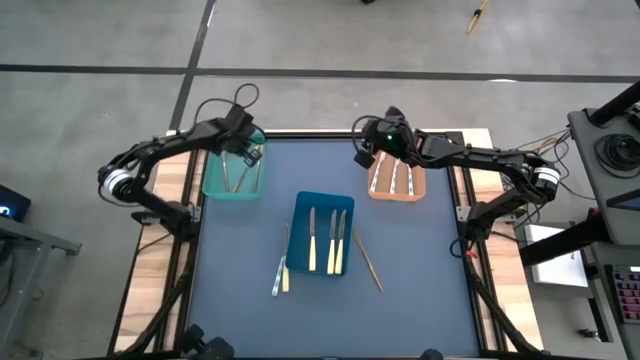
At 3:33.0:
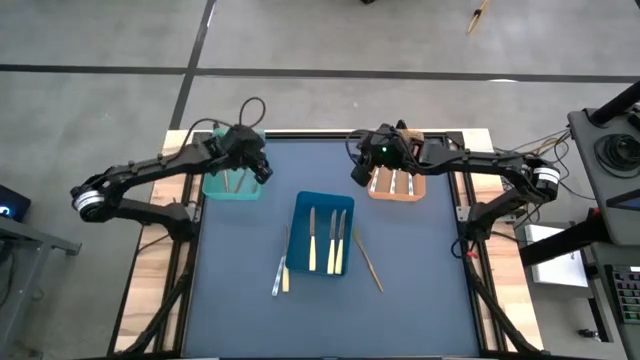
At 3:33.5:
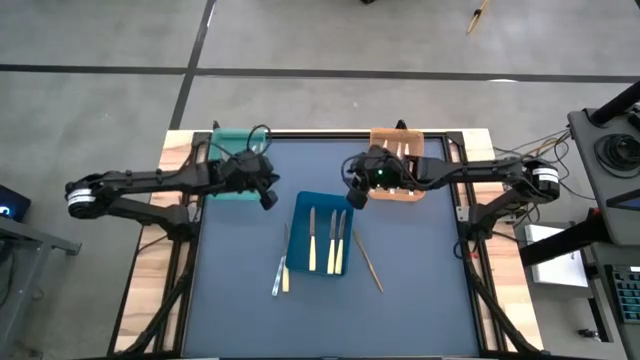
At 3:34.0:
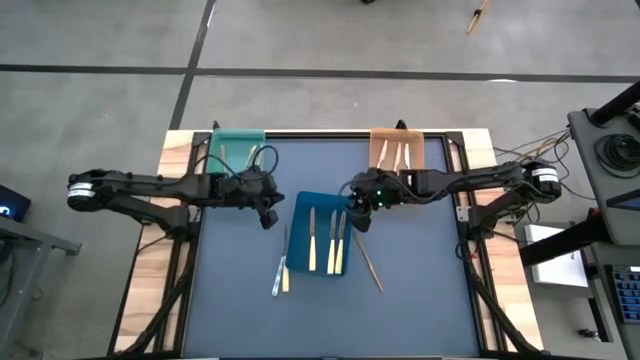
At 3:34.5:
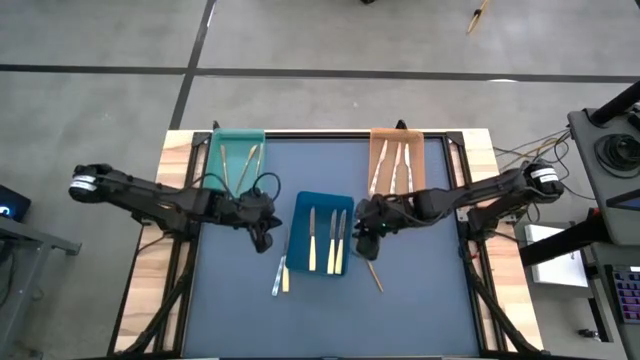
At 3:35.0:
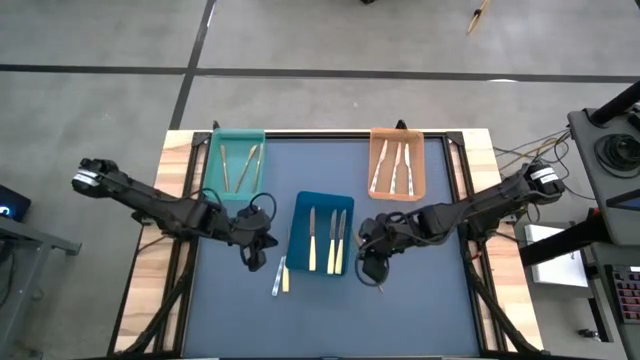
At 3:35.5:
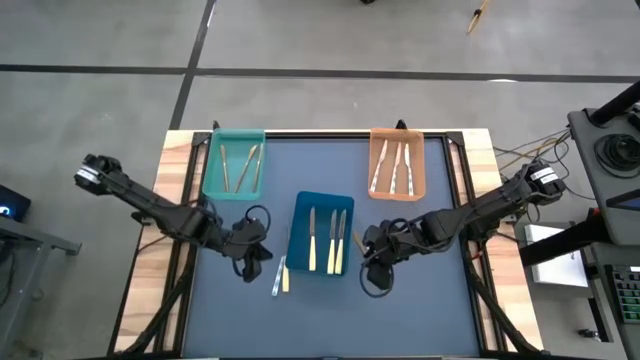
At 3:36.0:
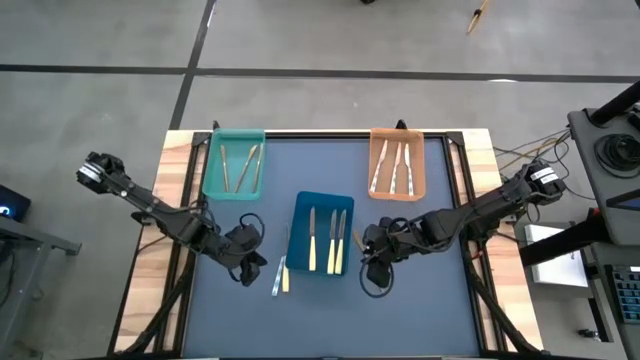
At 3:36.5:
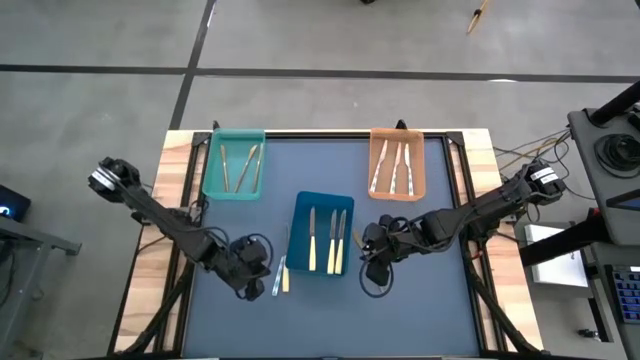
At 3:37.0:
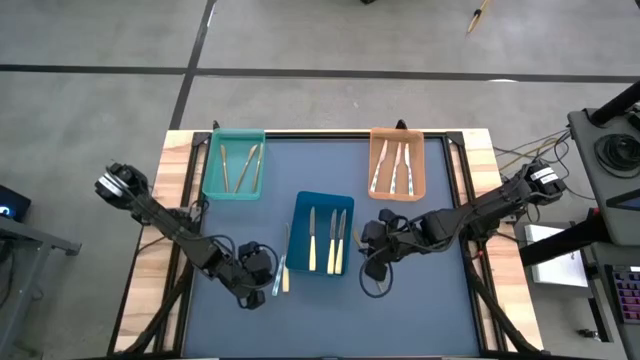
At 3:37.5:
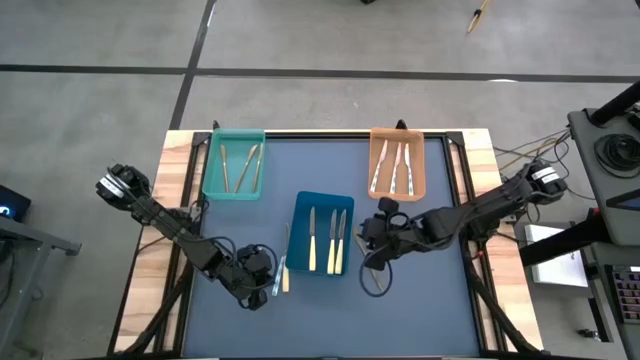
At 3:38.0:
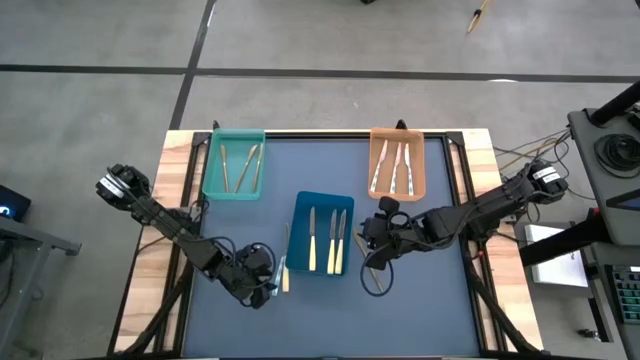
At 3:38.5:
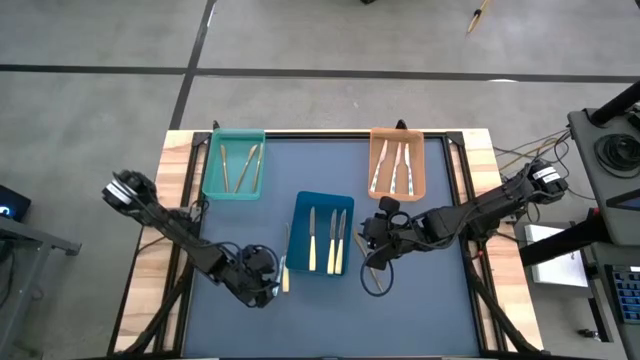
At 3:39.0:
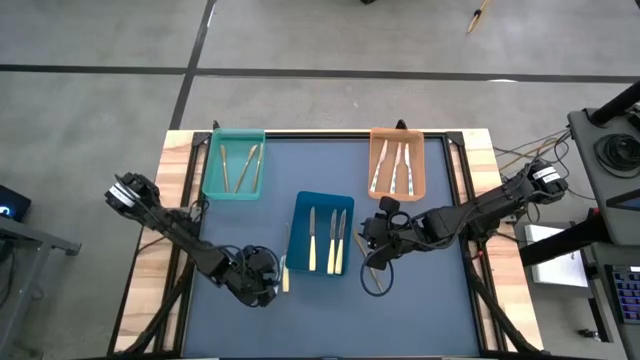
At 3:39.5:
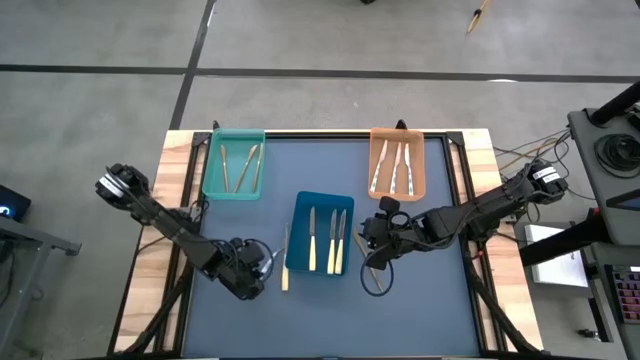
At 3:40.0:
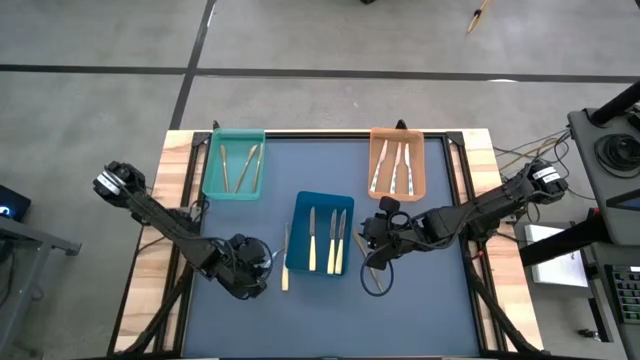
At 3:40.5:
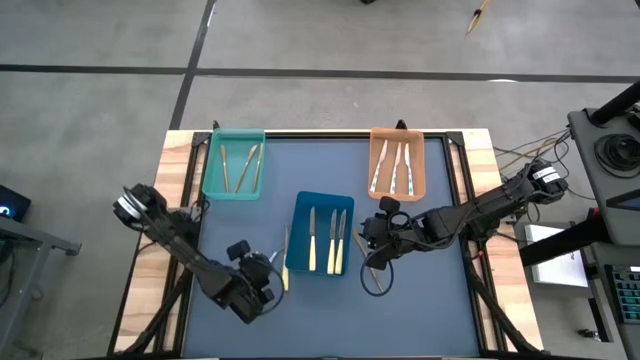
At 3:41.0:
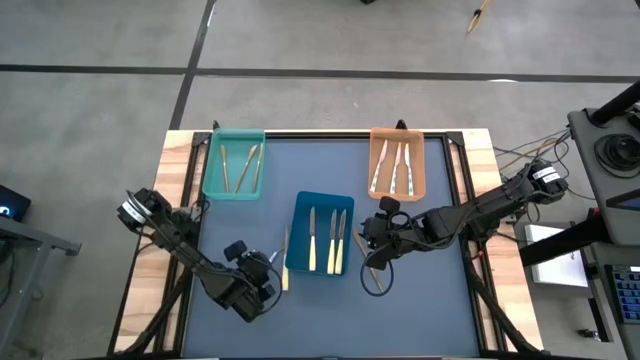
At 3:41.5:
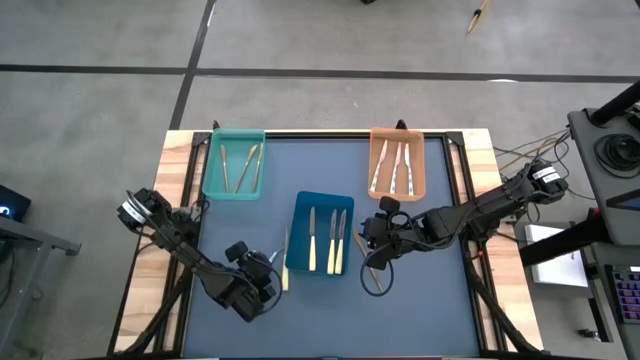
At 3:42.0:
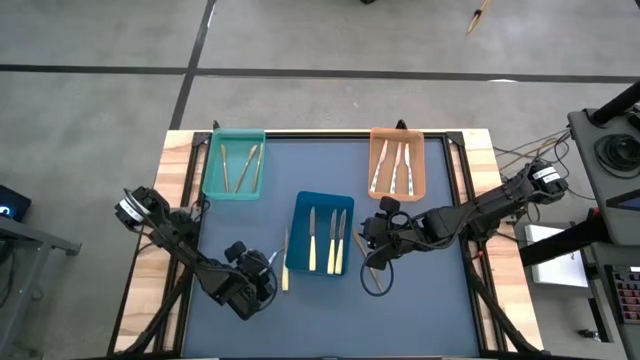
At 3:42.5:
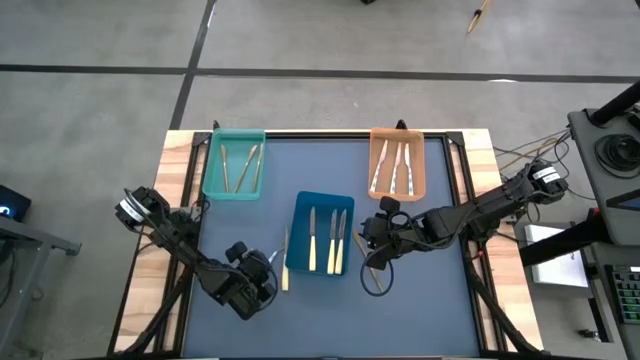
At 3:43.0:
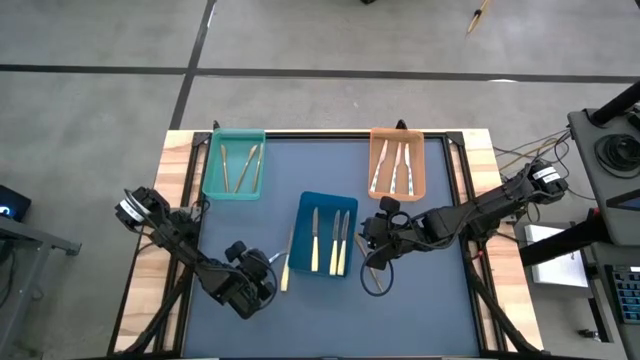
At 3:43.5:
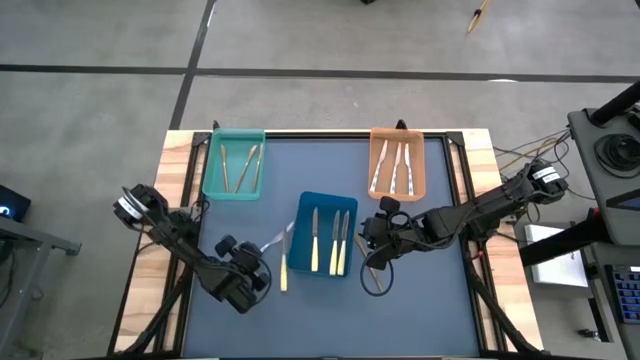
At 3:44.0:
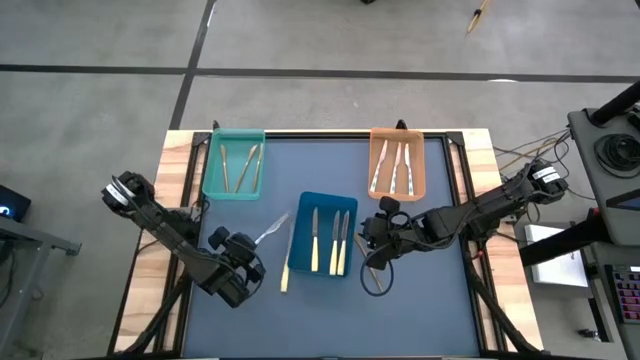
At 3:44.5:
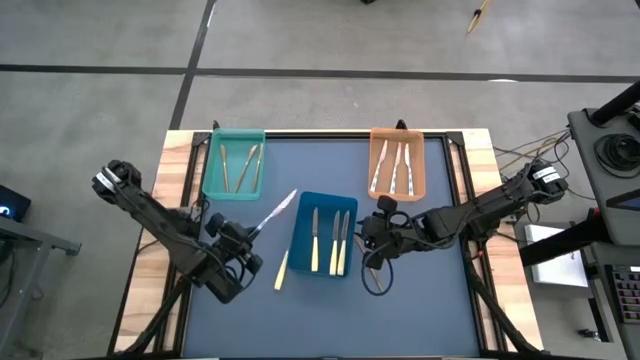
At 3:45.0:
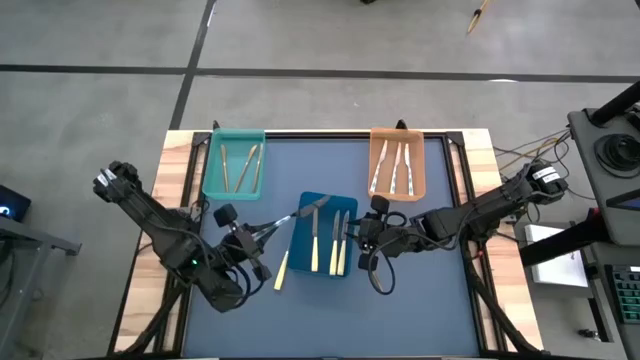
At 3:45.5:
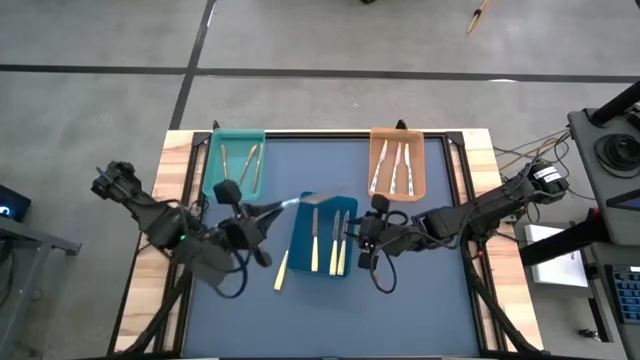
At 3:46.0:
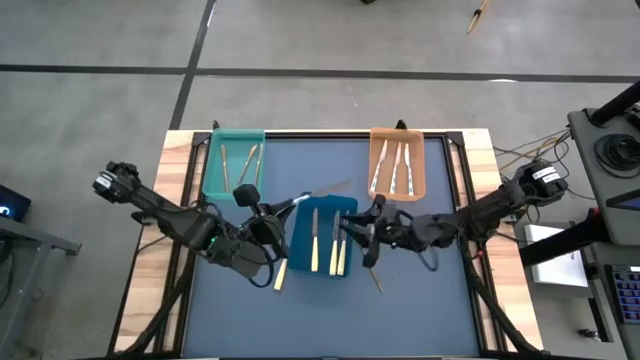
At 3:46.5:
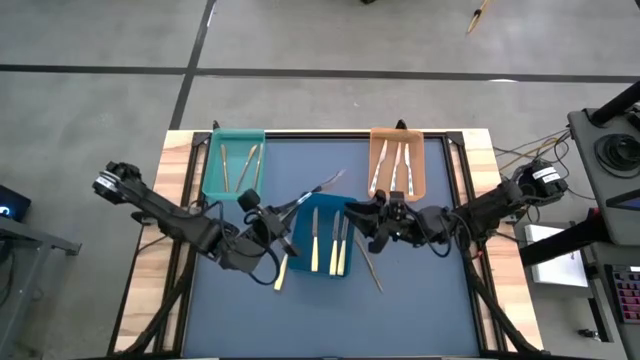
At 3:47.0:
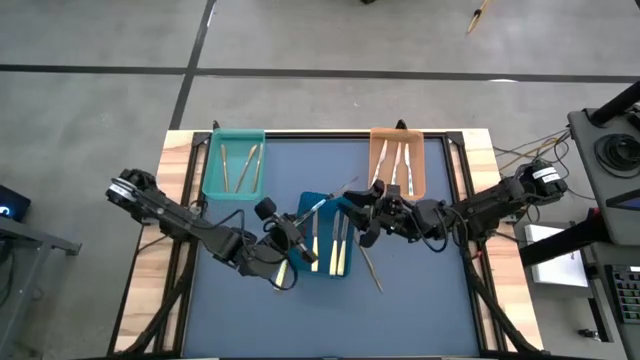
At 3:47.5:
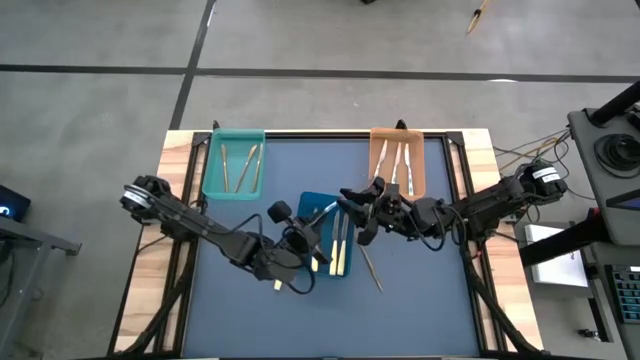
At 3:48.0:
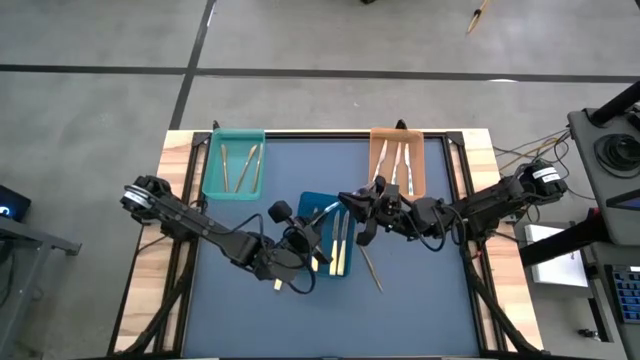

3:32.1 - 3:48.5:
Task: Sort silverware by color (type)
Put the blue and white knife into the orange bin

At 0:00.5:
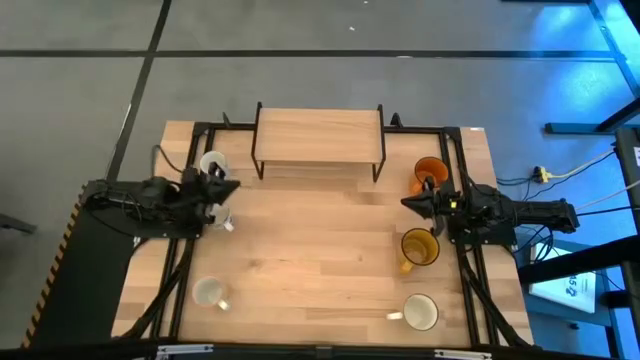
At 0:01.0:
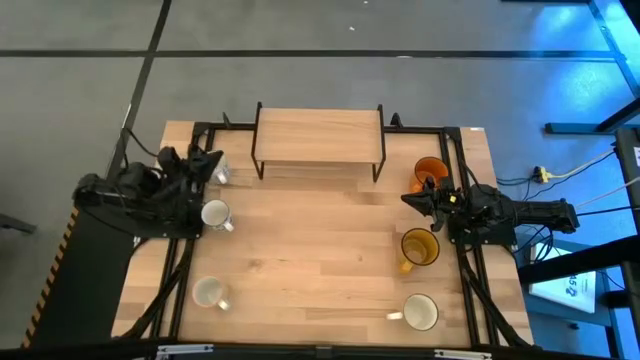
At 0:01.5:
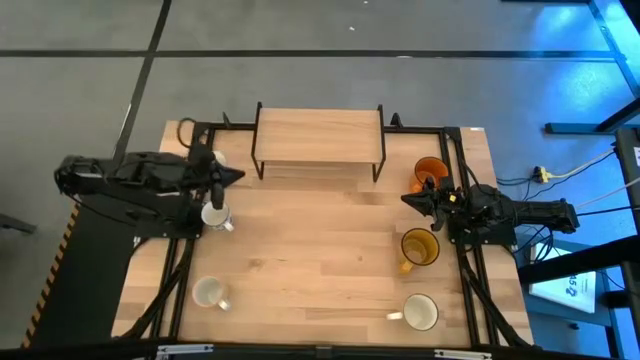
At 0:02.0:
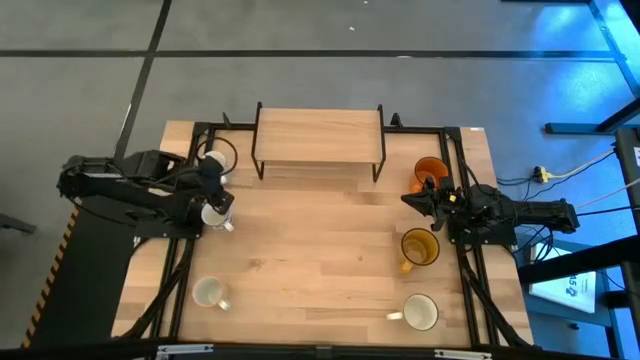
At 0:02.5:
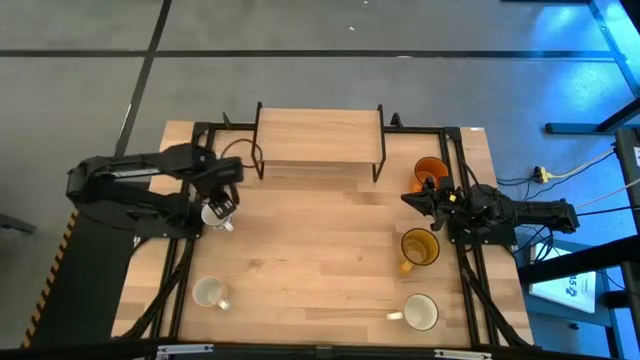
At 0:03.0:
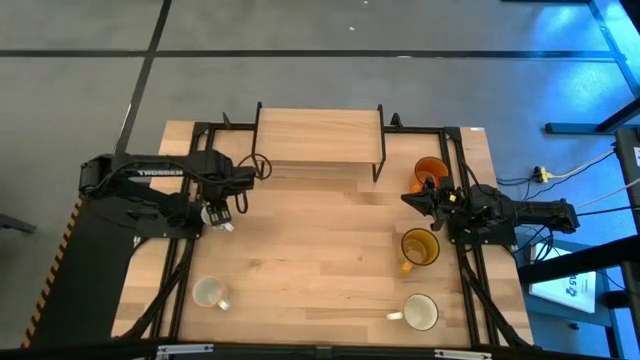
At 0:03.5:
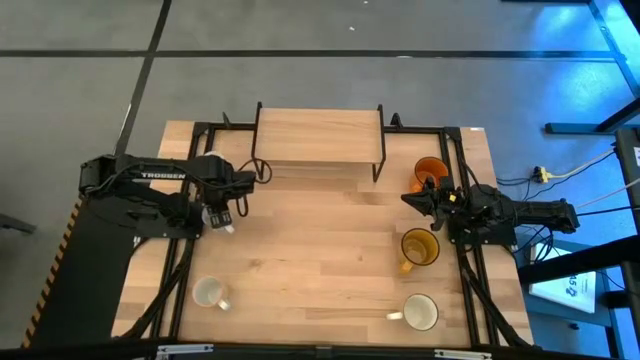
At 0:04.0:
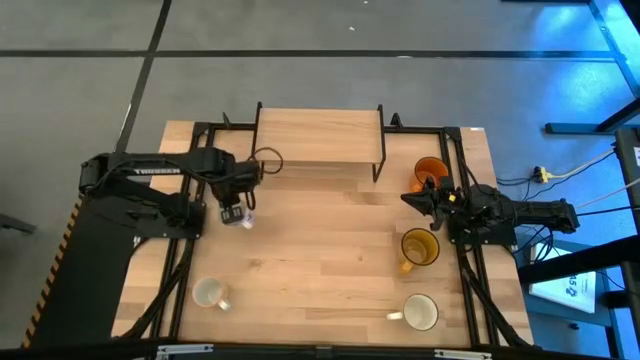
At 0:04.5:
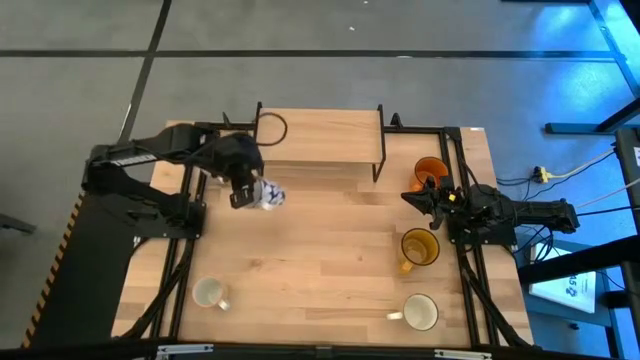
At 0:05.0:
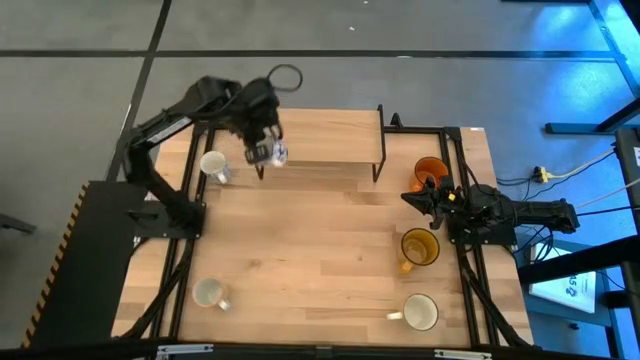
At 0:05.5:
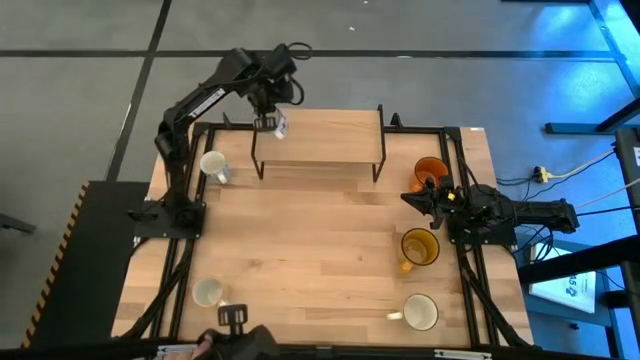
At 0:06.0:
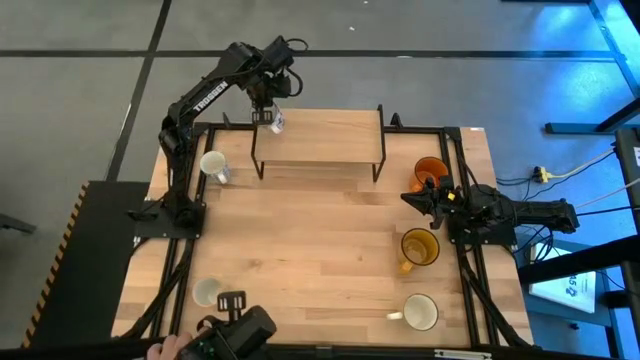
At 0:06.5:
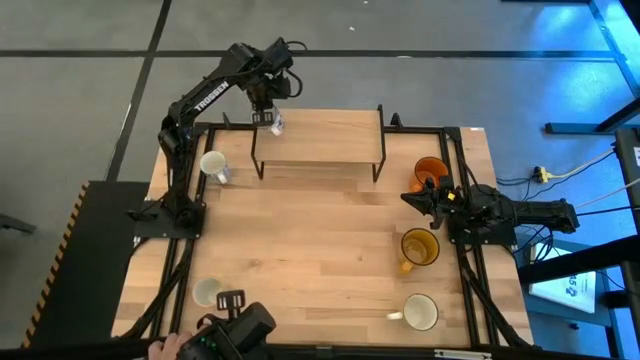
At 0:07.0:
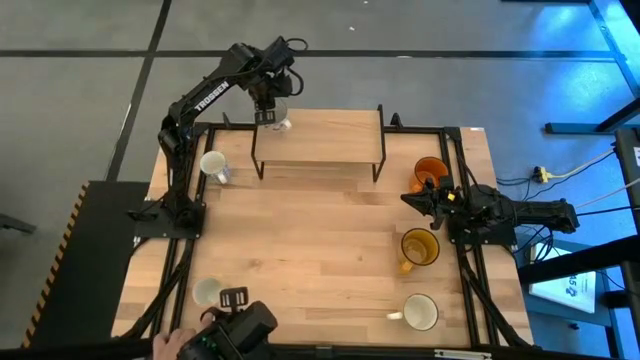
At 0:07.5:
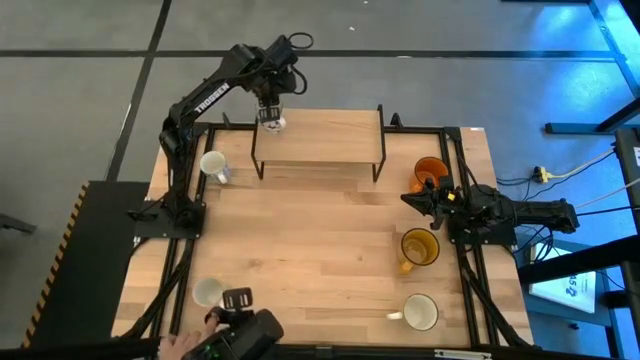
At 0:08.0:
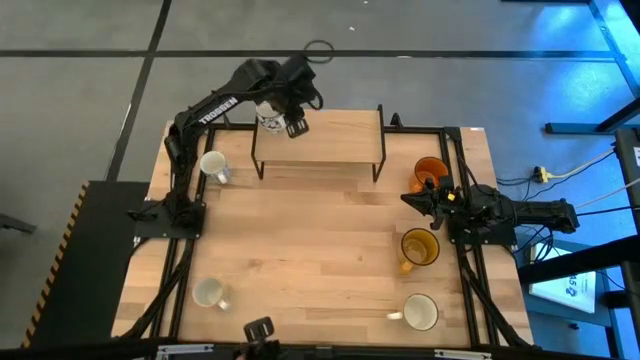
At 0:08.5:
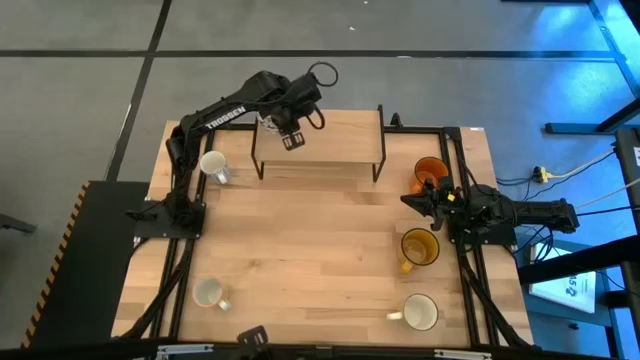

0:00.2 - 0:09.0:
Task: Place coffee mugs
Put the blue patterned mug on the shelf
